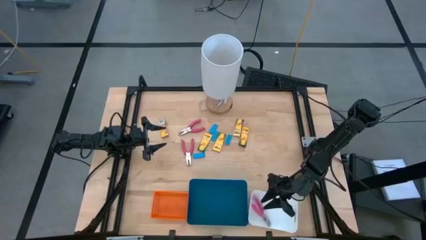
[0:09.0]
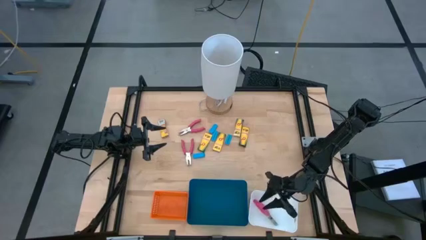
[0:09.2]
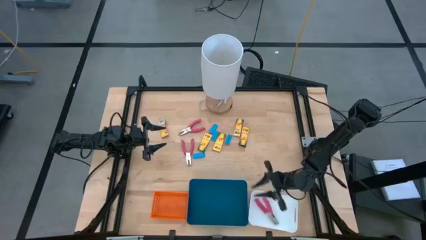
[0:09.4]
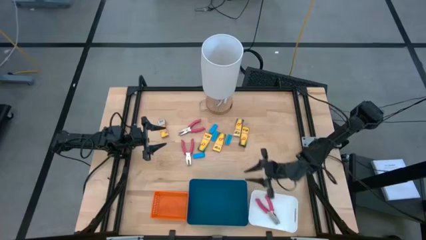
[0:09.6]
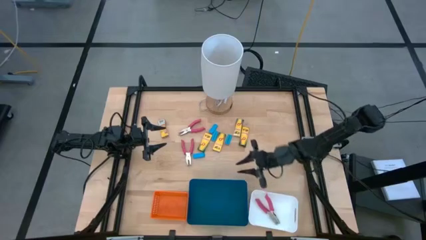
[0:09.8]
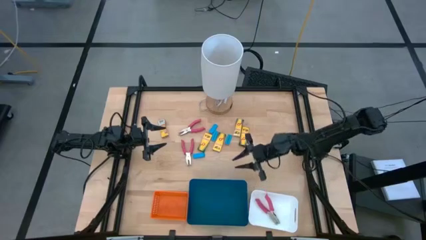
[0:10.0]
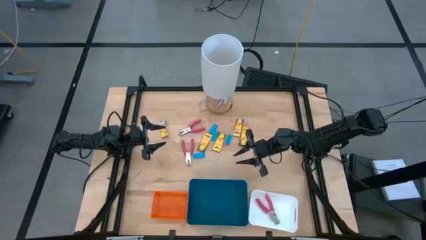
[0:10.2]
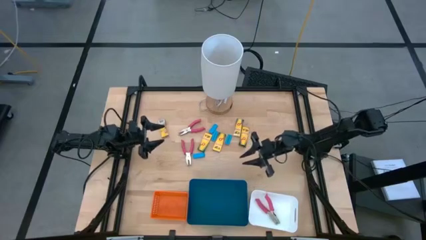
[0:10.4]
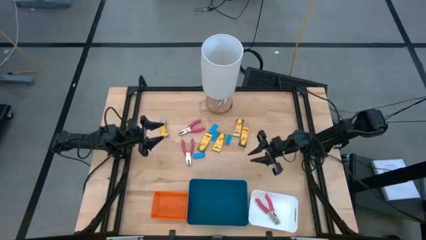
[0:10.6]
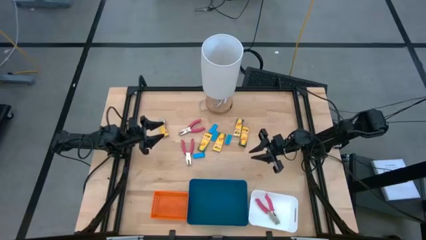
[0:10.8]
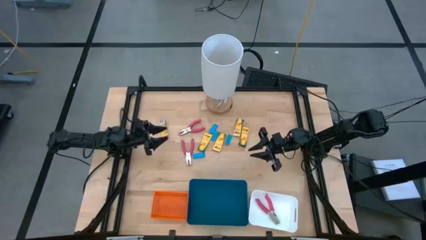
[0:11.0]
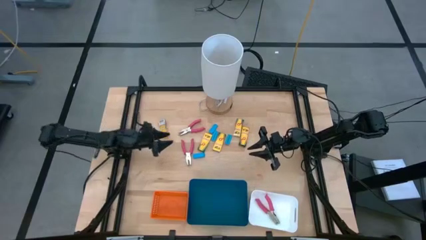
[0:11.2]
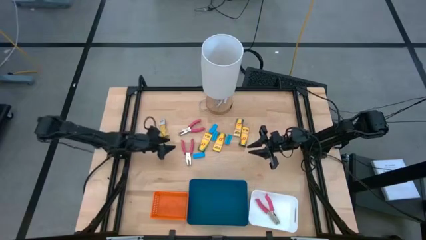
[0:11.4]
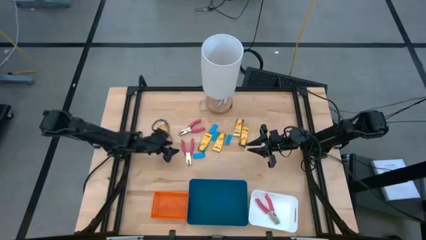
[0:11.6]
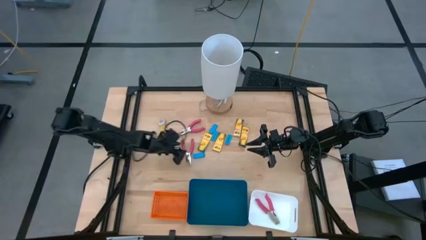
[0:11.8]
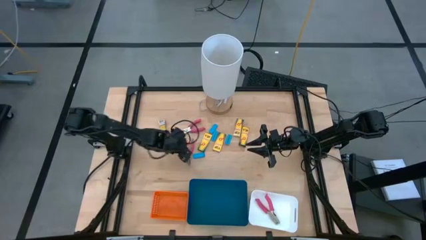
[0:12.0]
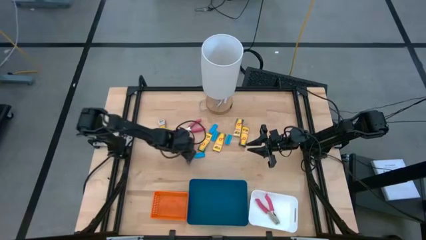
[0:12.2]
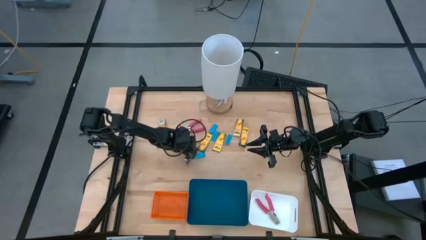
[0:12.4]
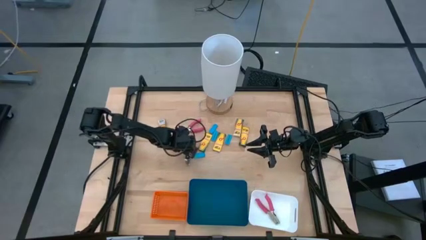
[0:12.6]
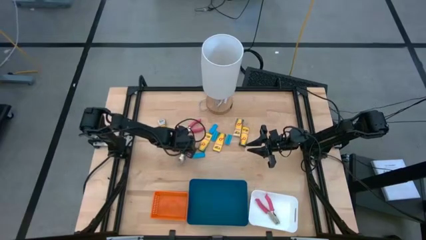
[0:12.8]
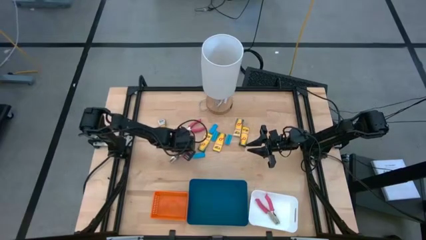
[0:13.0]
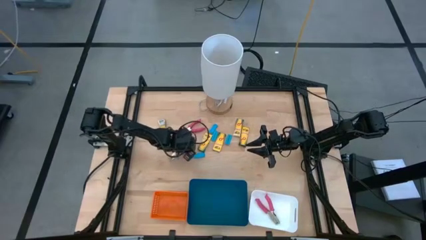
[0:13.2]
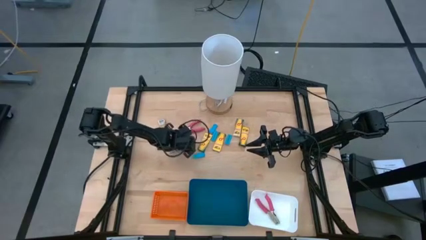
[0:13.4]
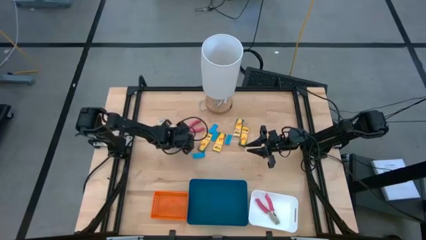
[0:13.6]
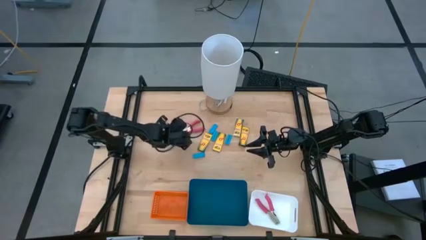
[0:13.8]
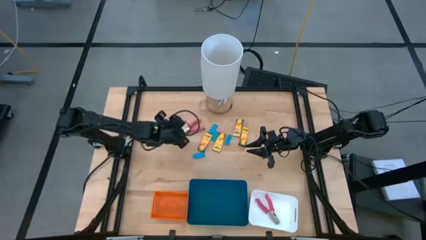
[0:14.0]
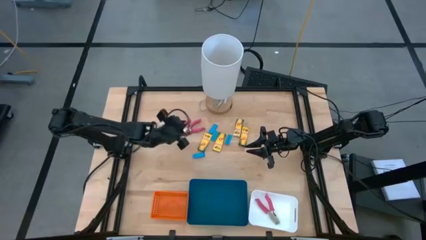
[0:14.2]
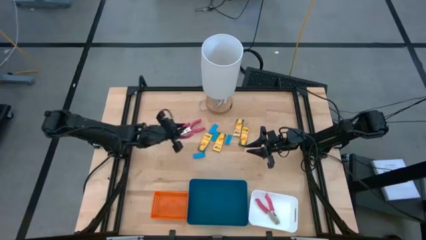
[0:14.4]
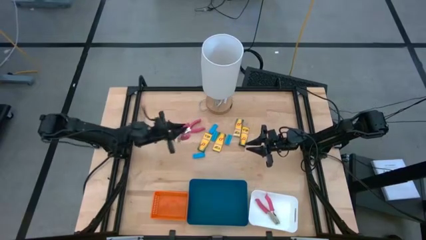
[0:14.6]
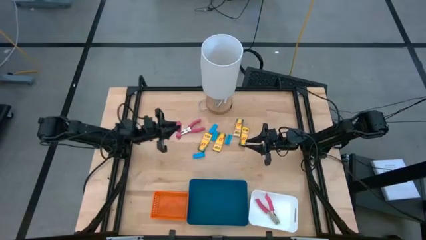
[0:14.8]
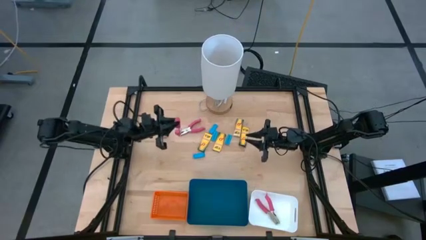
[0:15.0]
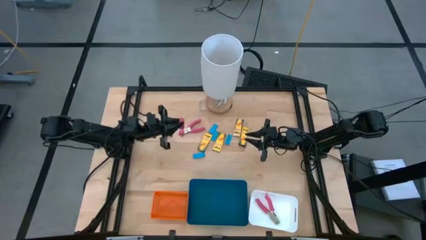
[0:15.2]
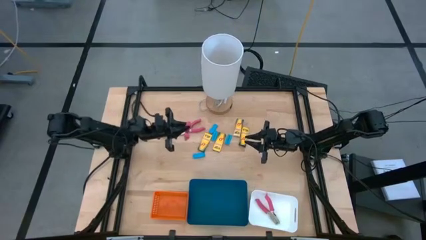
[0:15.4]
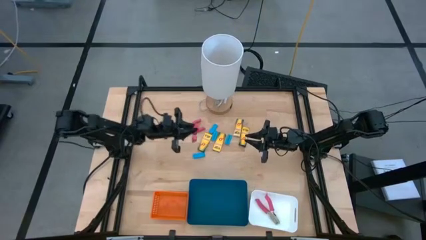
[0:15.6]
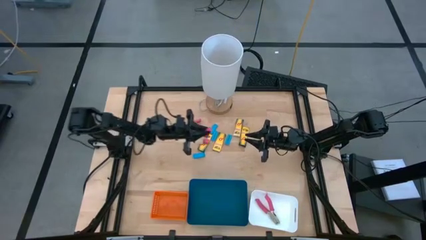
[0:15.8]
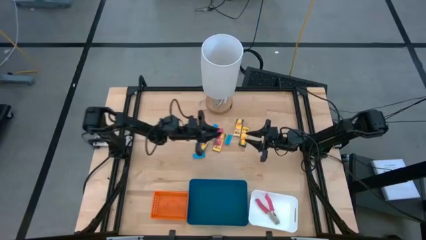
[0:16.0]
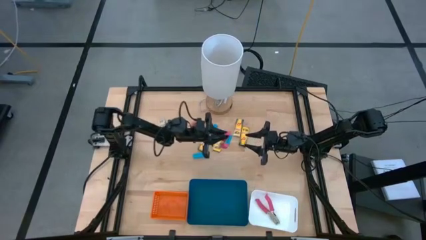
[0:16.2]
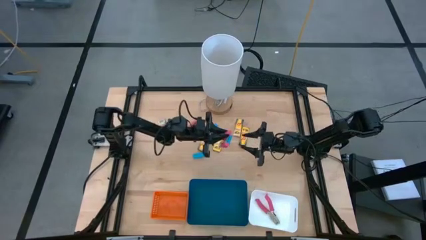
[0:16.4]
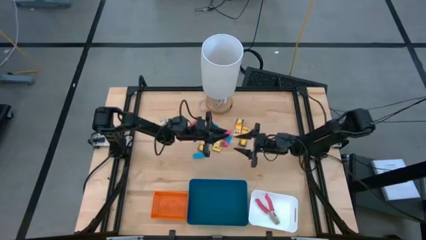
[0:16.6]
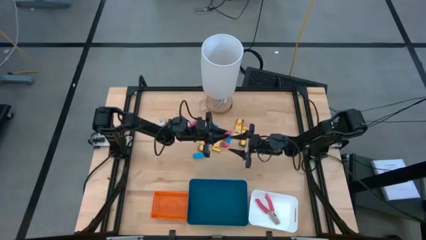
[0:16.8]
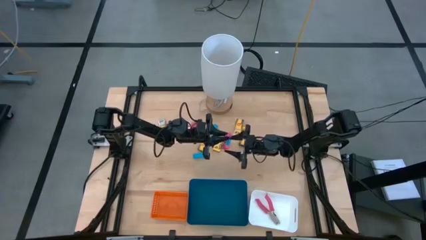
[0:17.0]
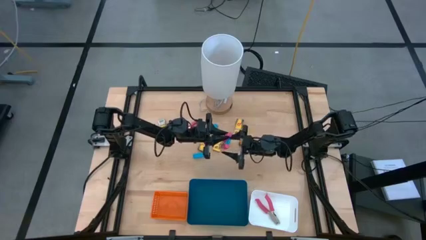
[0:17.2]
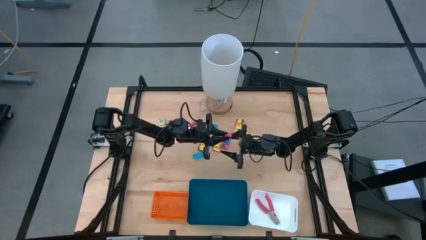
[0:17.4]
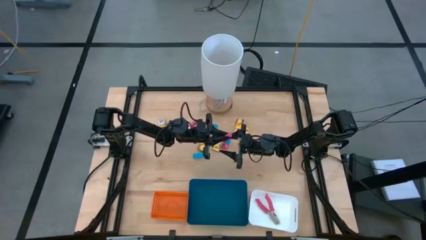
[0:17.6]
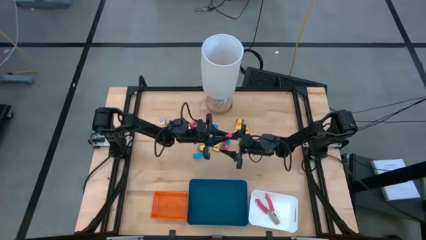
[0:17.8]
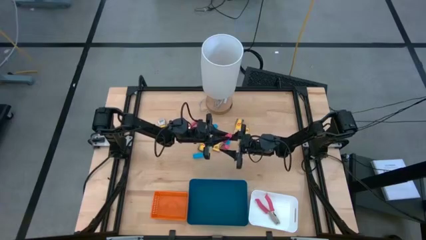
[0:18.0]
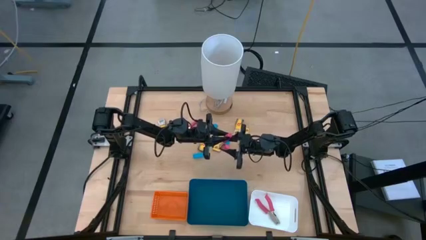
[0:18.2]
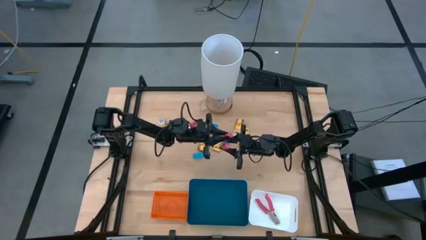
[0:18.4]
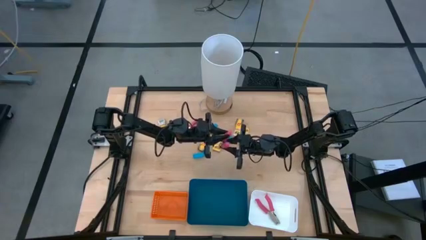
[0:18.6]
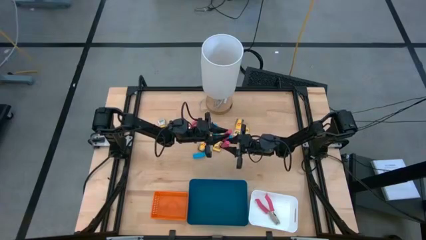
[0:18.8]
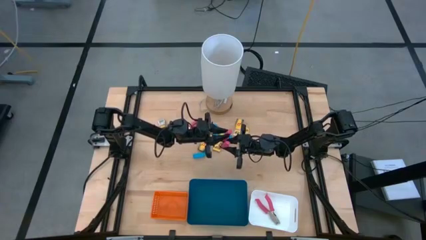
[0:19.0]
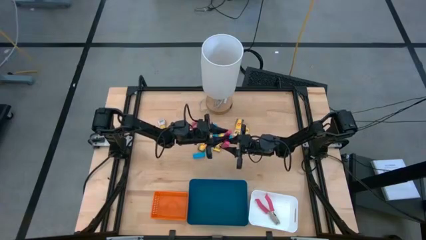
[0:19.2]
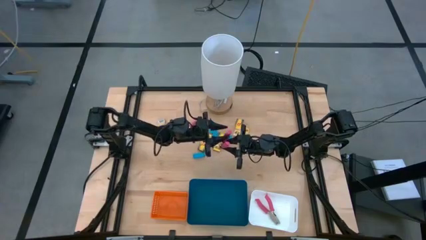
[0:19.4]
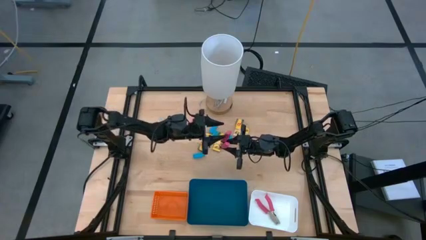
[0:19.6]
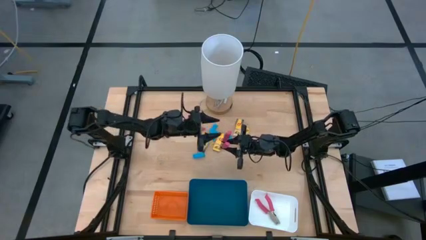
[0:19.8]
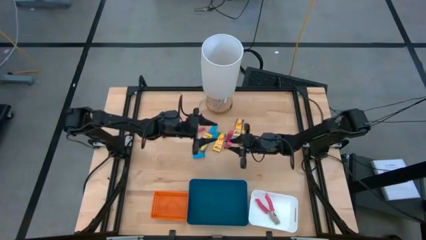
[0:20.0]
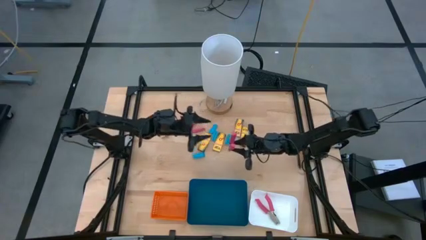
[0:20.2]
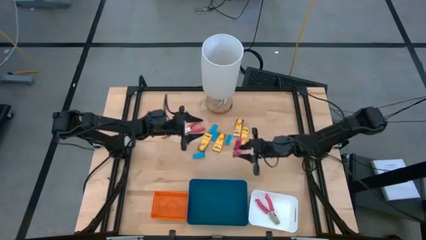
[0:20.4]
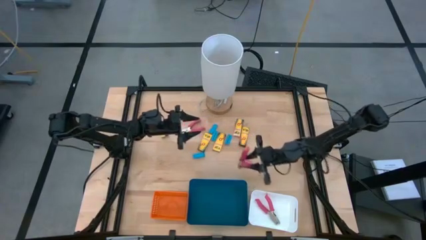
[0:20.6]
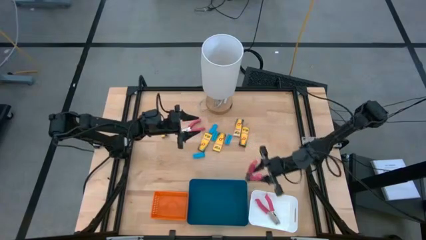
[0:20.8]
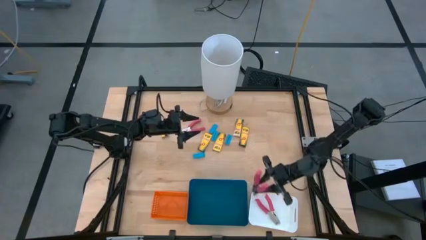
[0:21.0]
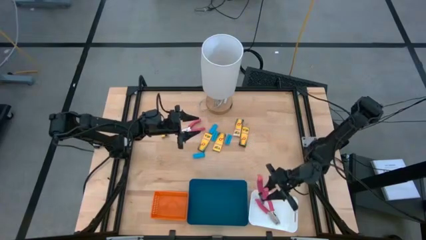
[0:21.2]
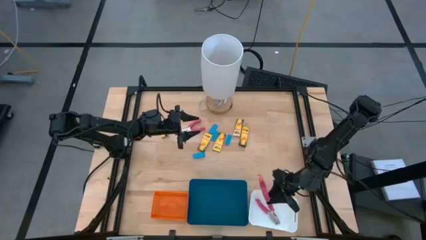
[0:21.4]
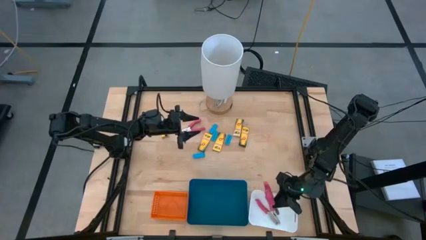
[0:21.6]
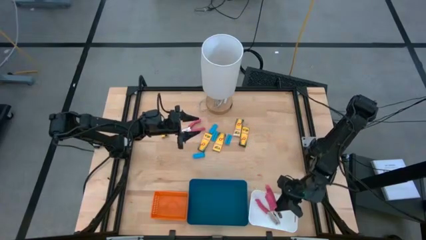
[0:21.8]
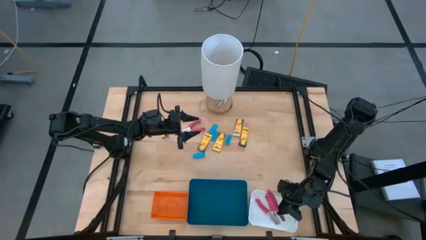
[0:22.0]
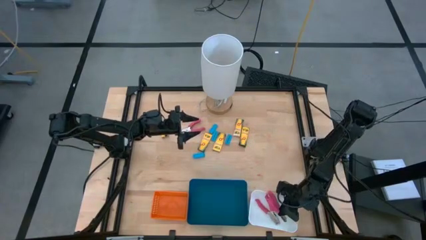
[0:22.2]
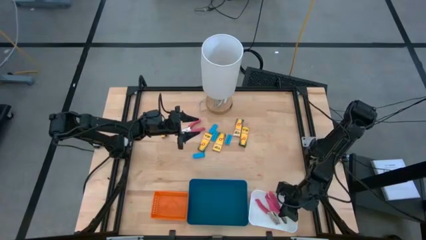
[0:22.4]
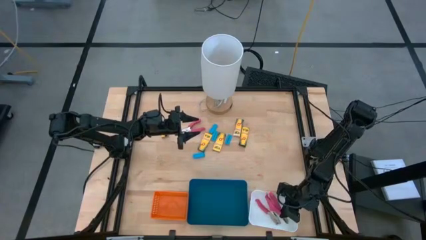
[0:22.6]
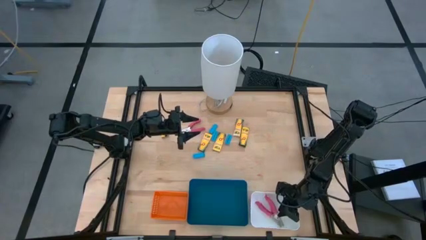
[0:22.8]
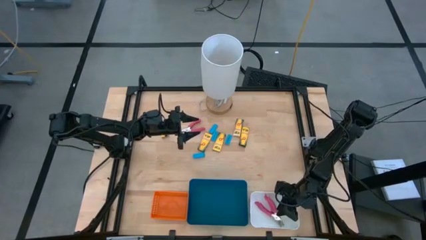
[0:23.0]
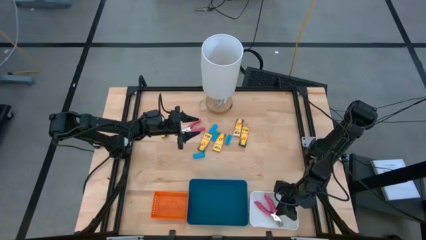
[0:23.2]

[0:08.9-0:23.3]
Task: Pick & Place School Supplies
Put the pink hole puncher into the white bin

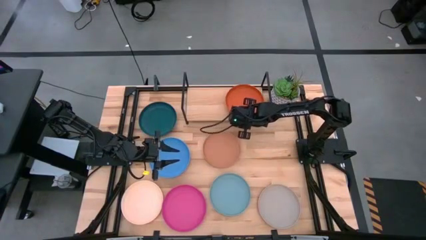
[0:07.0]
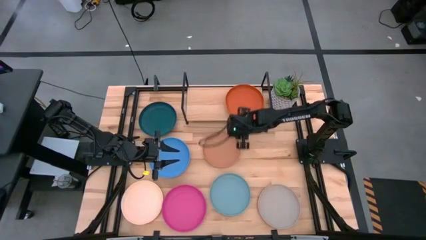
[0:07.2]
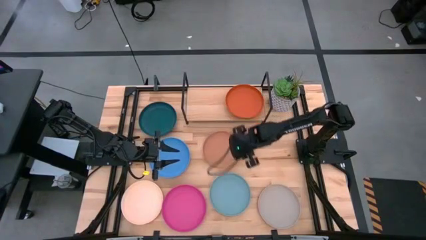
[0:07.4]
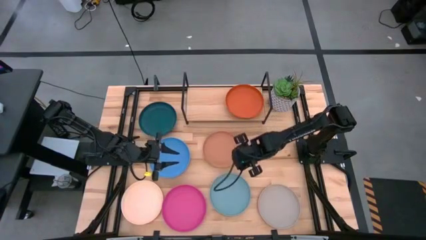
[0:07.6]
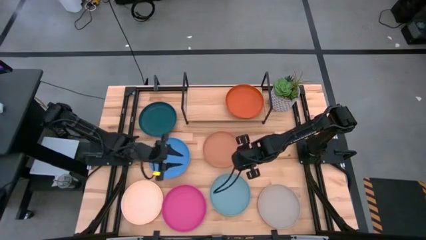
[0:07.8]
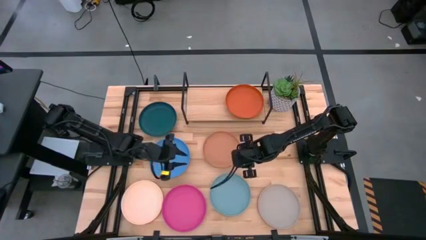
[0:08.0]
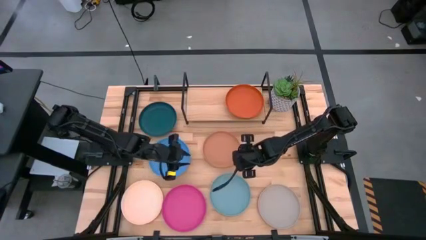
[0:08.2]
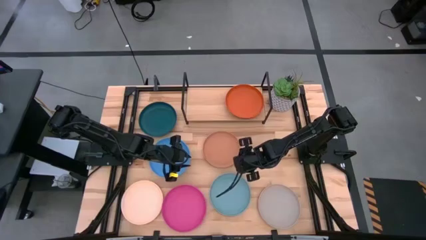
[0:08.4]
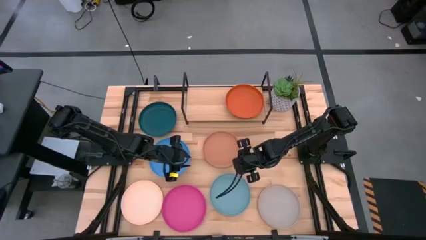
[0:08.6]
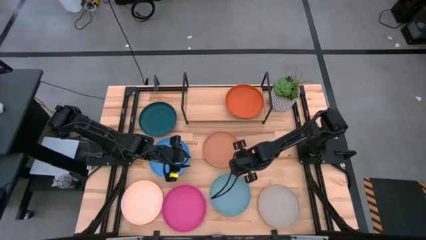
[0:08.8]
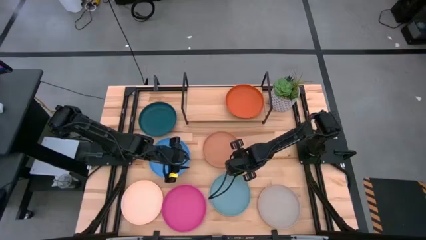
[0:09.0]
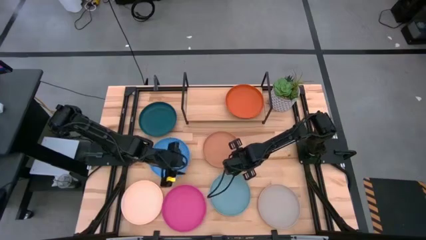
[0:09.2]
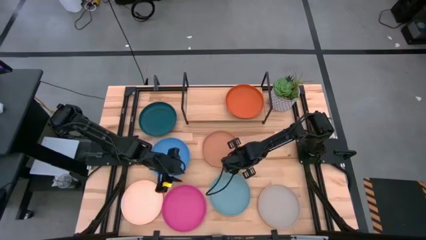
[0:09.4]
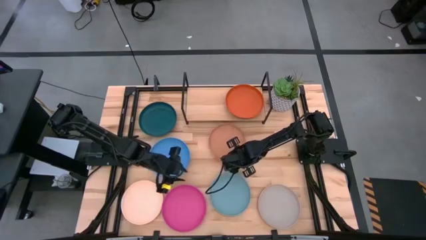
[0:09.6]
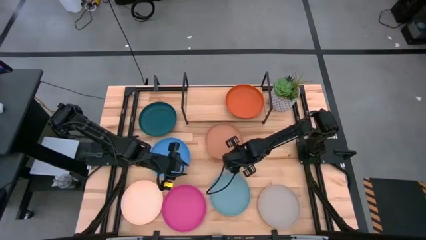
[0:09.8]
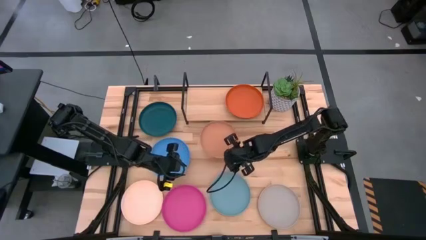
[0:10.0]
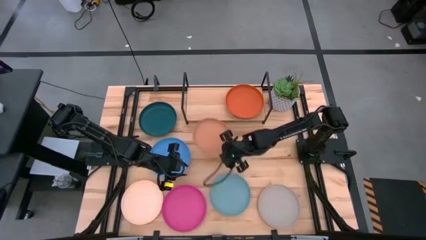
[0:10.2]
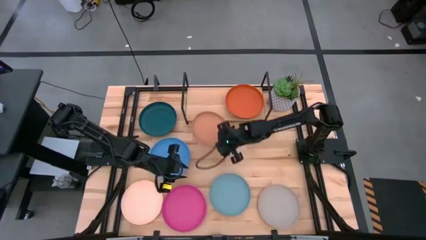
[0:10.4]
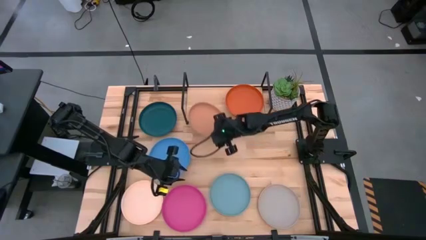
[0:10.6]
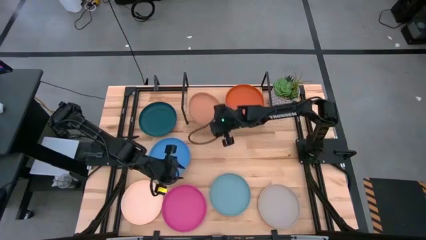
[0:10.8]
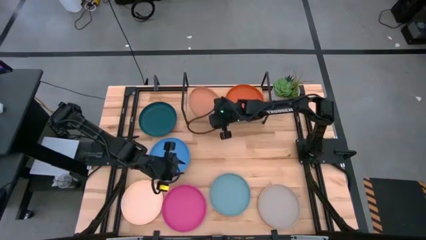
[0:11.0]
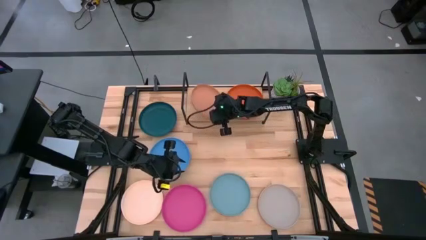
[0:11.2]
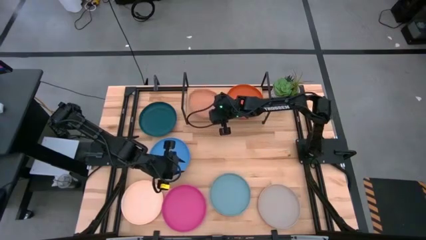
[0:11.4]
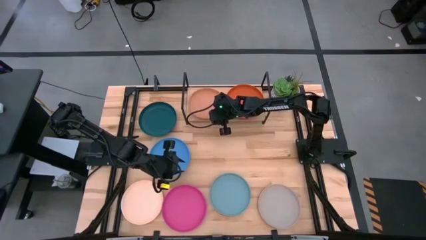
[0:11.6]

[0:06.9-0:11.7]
Task: Place and stack plates onto a shelf
Put the brown plate on the shelf
